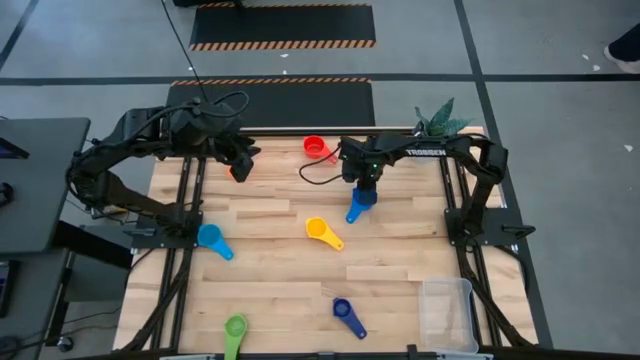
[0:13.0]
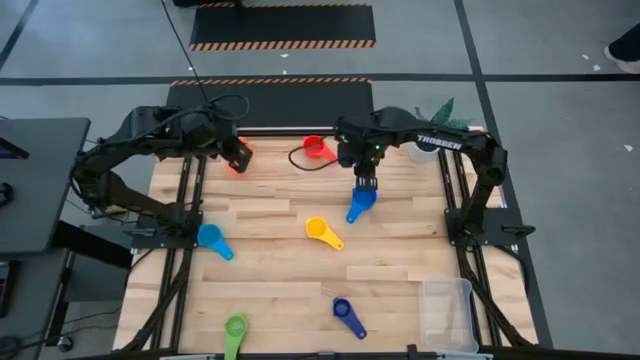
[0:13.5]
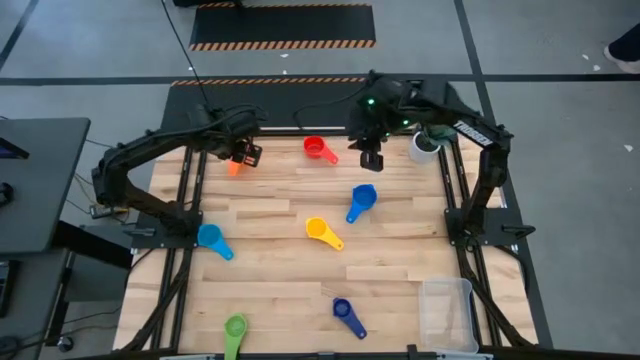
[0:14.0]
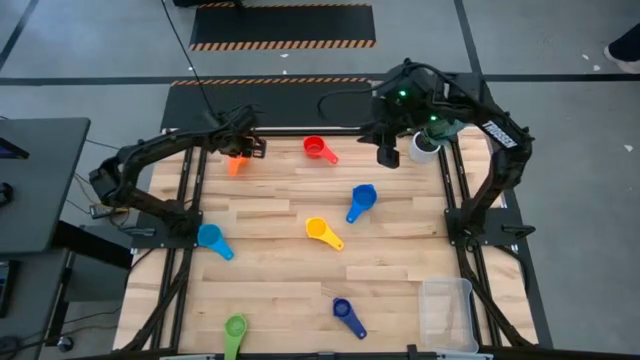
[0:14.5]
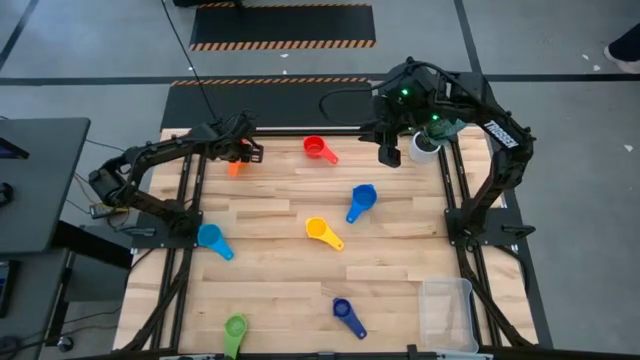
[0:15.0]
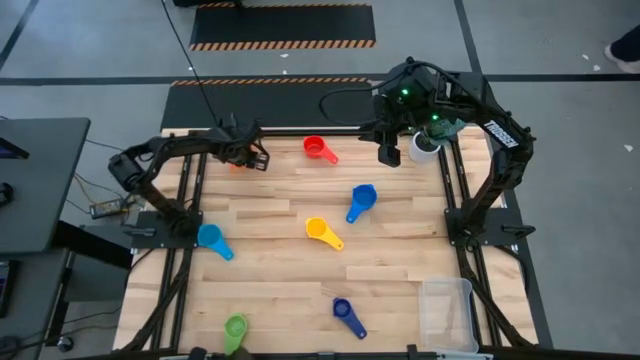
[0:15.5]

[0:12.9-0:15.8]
Task: Nest measuring cups in basket
Move the orange measuring cup to the center of the table

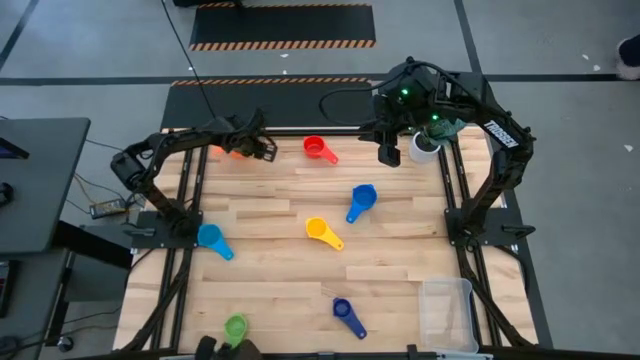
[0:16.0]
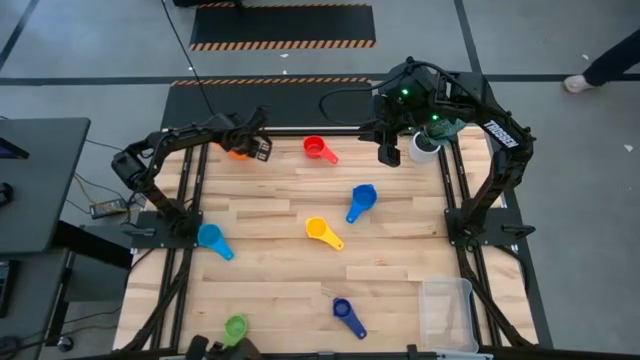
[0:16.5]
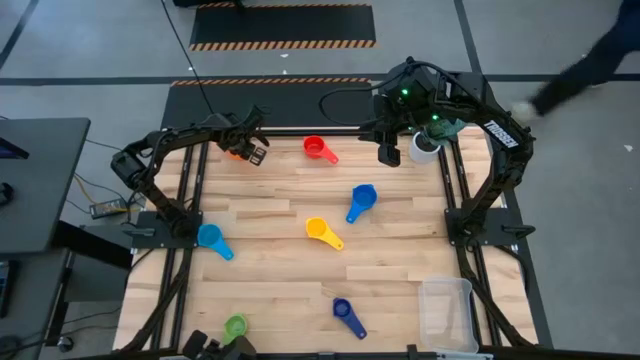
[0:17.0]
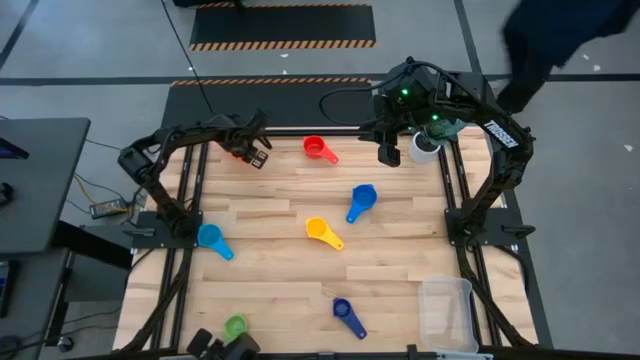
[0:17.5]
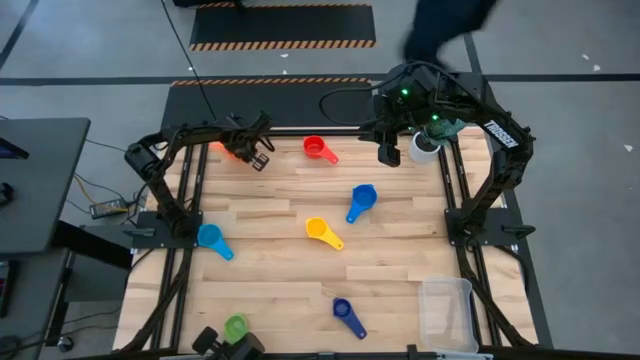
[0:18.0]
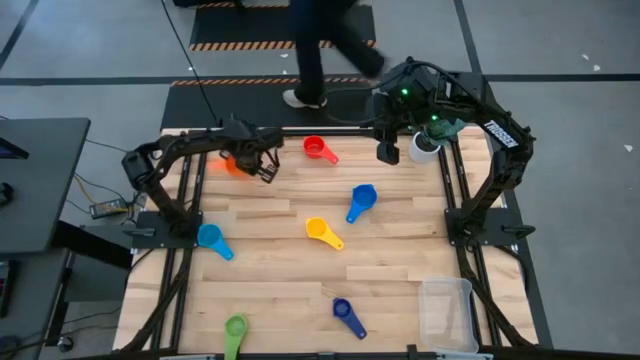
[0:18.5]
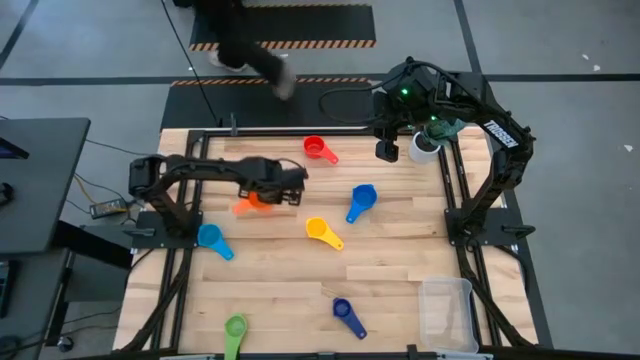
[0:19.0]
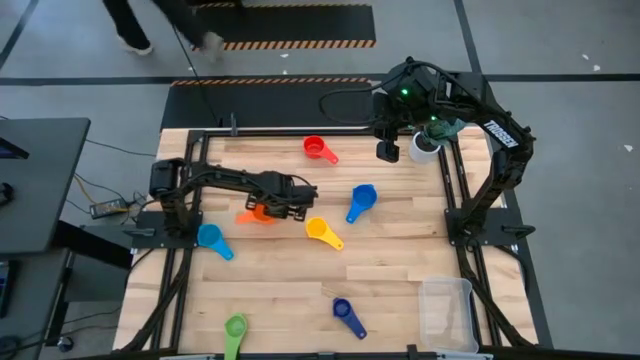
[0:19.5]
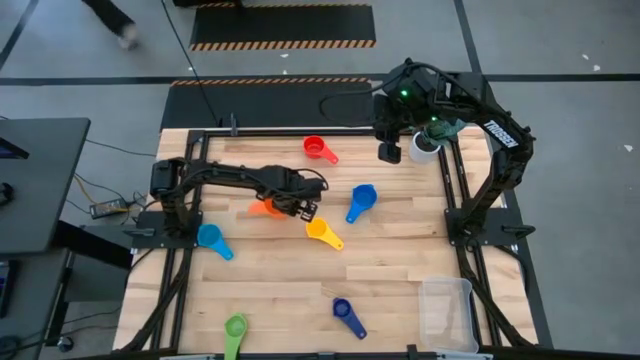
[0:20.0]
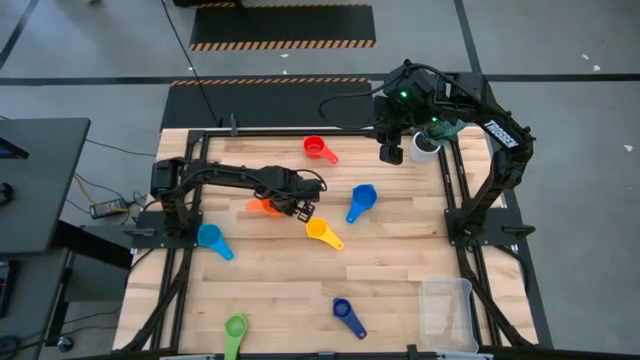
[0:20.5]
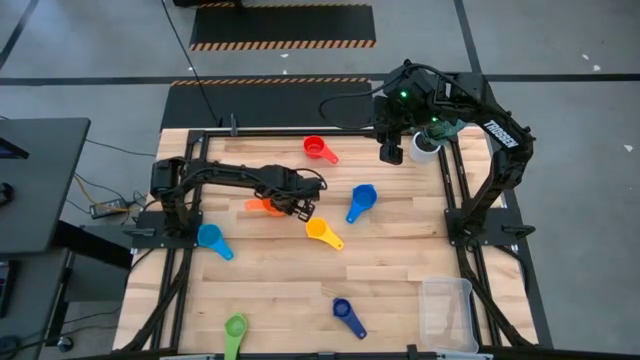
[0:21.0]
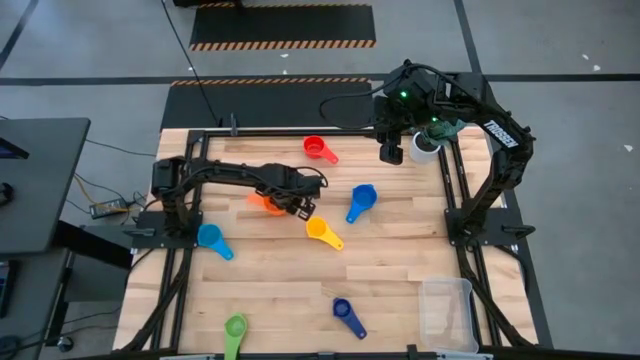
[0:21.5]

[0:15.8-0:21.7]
Move the orange measuring cup to the center of the table

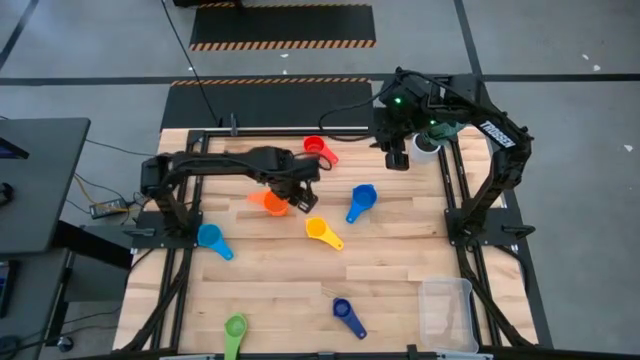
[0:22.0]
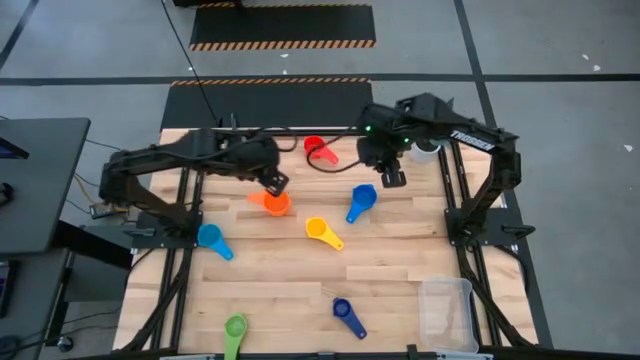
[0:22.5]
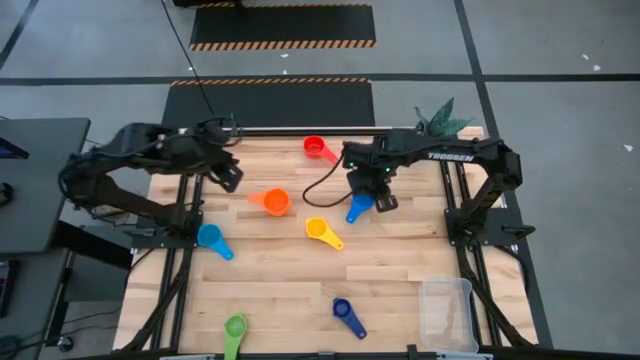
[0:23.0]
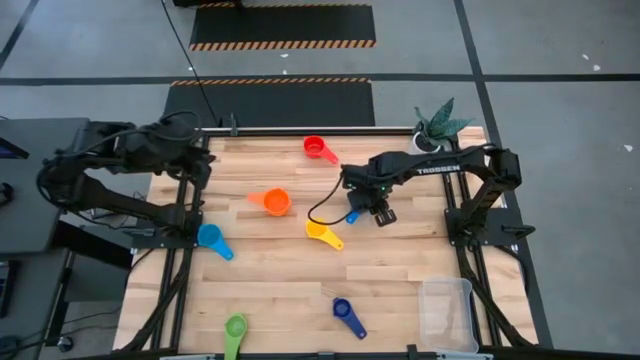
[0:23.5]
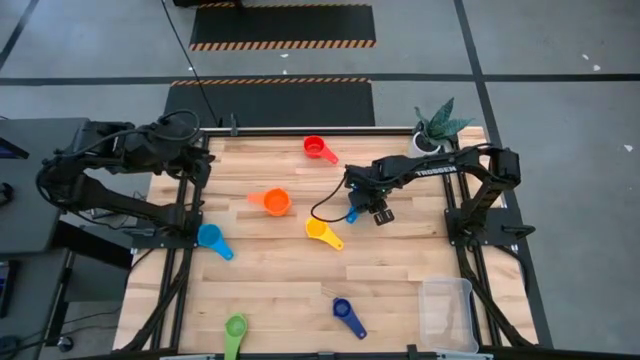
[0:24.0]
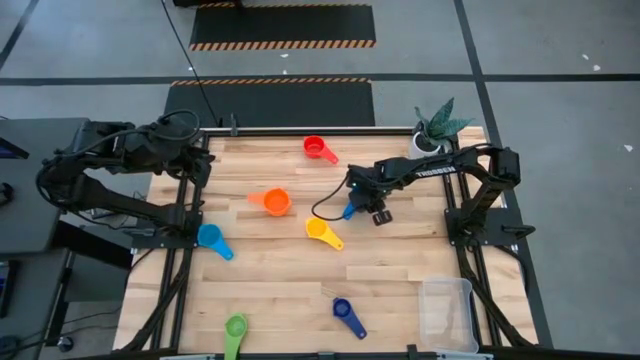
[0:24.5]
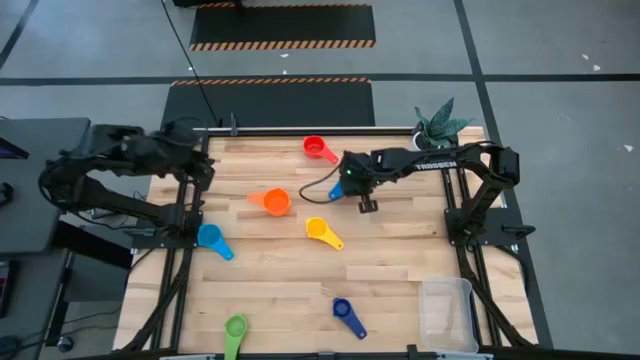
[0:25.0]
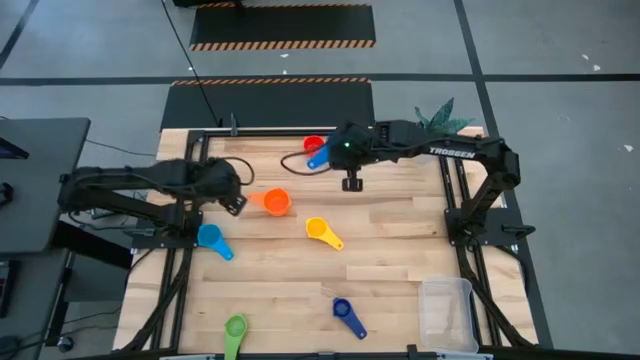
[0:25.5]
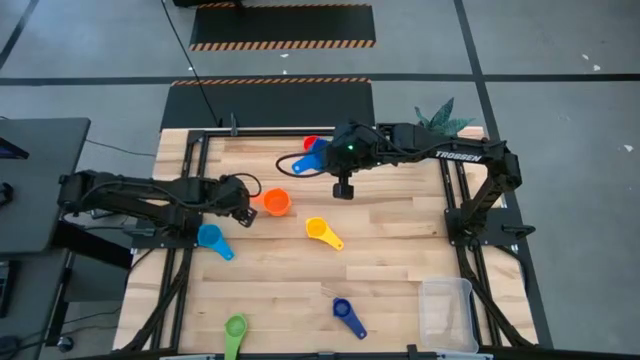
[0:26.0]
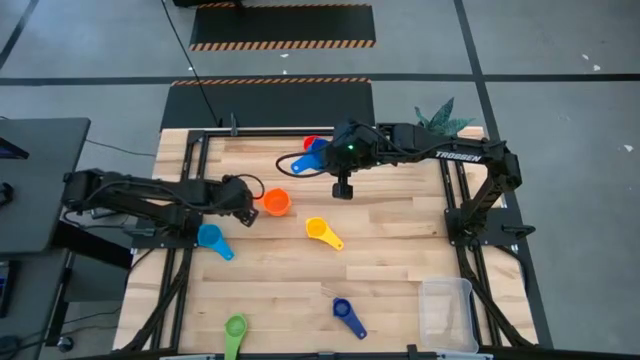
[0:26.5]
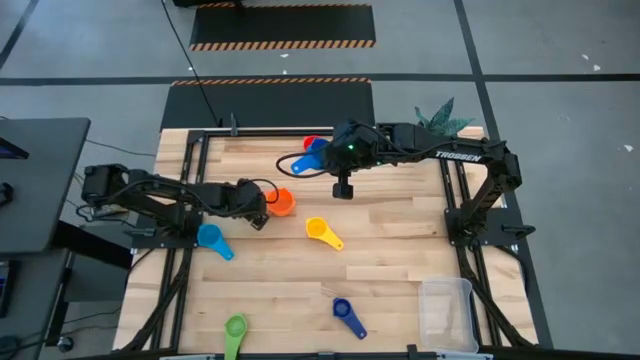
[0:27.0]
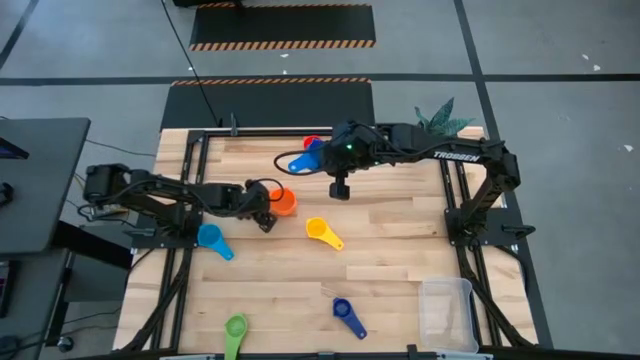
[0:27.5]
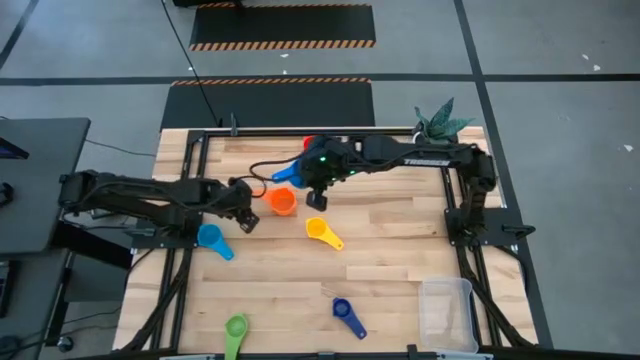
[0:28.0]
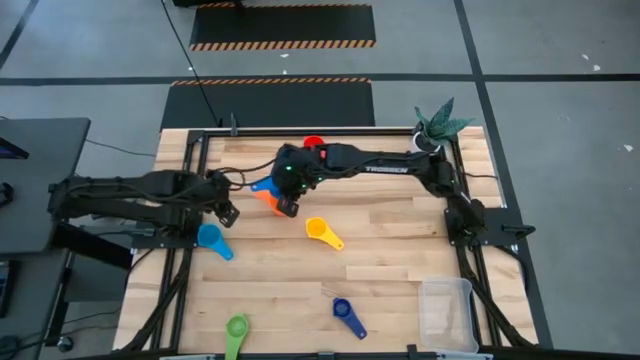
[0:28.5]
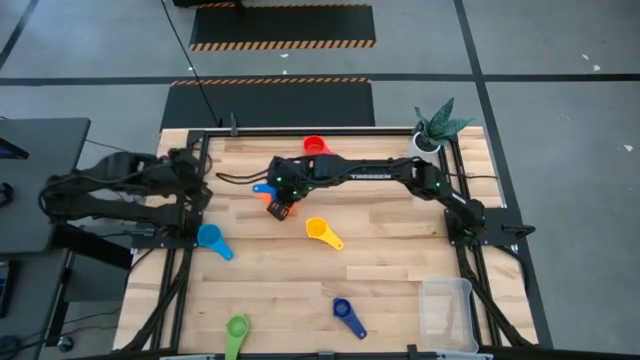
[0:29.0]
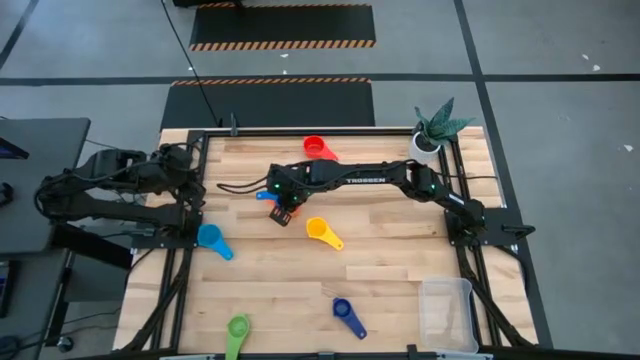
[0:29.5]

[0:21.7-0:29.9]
Stack the blue measuring cup on top of the orange measuring cup

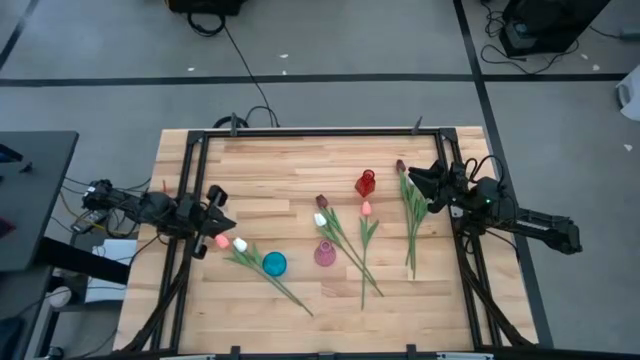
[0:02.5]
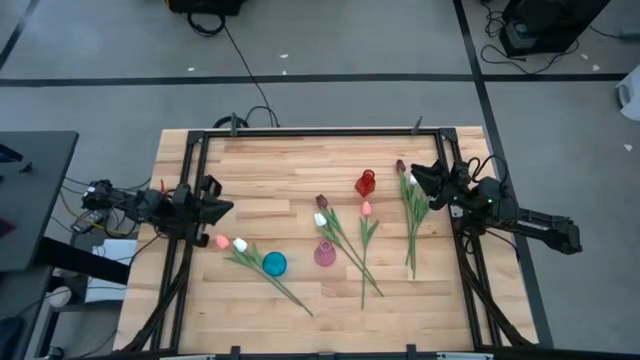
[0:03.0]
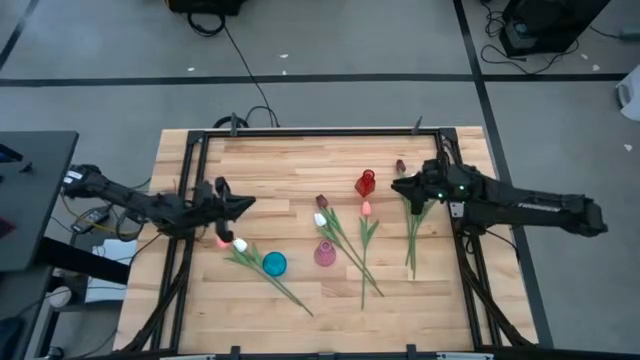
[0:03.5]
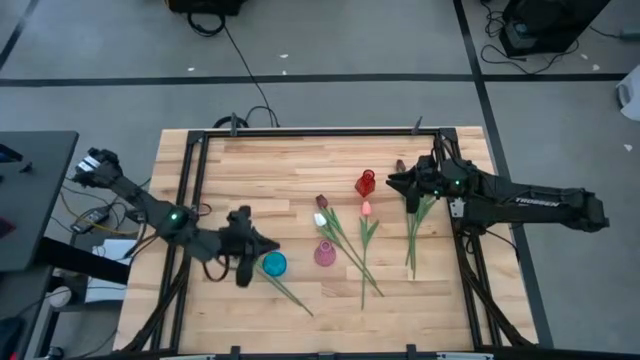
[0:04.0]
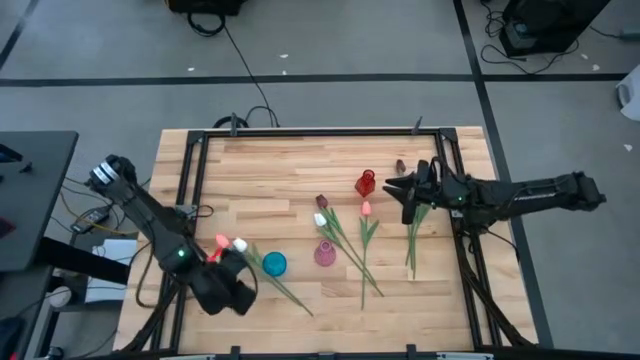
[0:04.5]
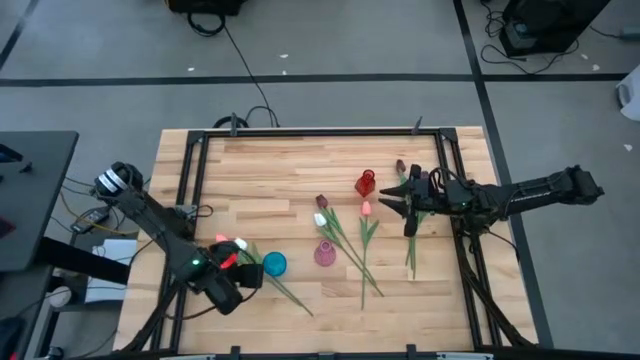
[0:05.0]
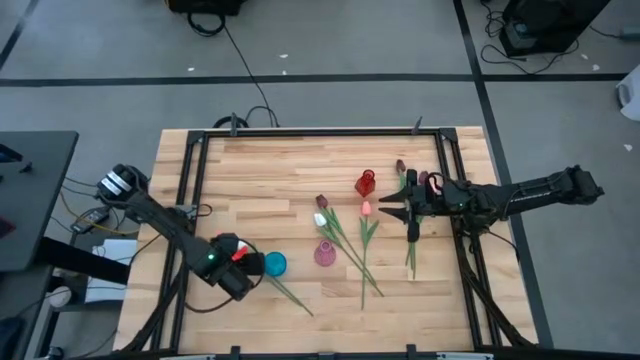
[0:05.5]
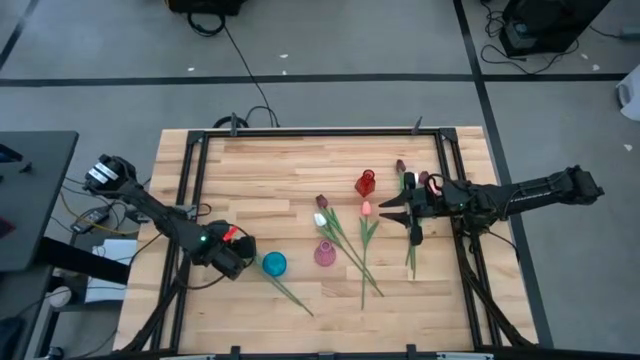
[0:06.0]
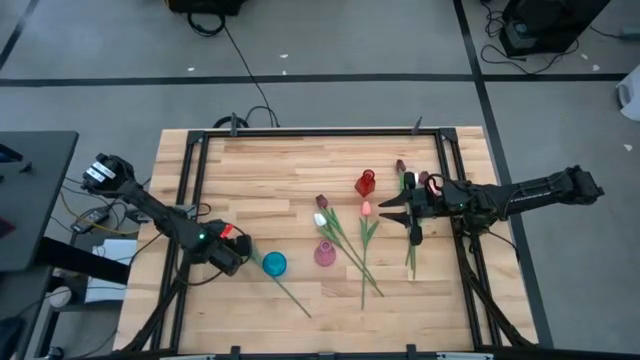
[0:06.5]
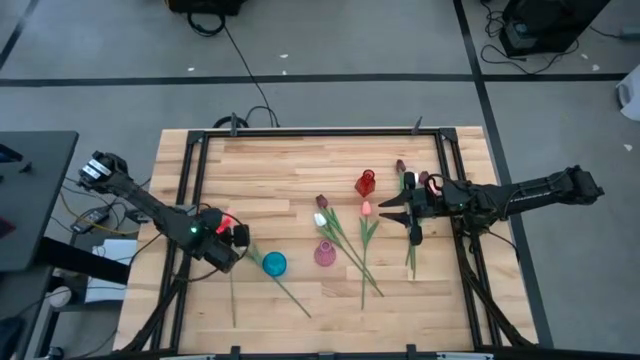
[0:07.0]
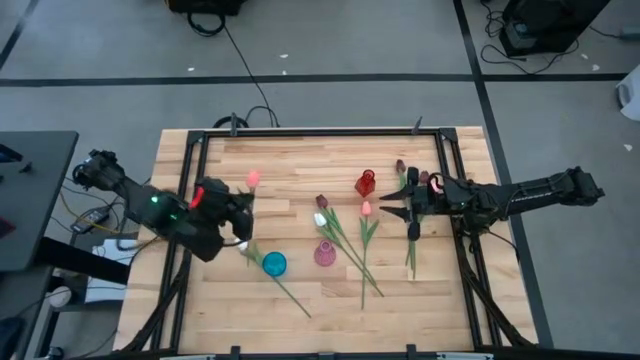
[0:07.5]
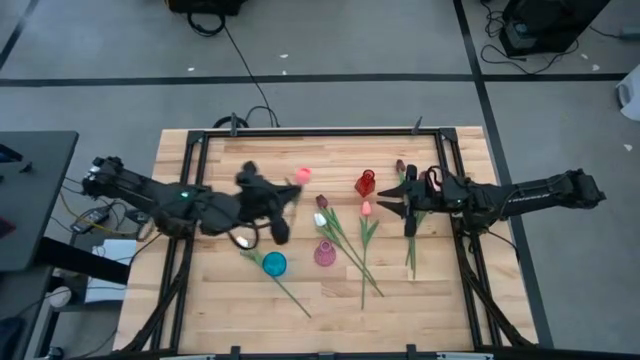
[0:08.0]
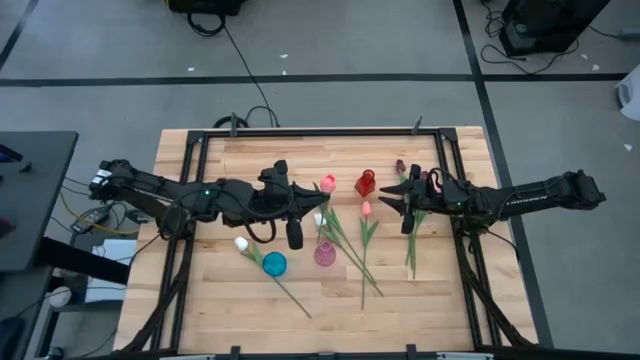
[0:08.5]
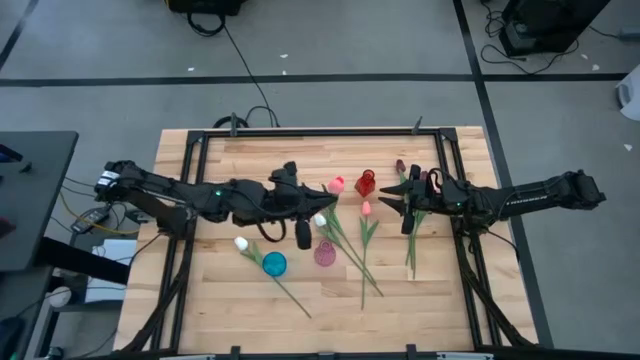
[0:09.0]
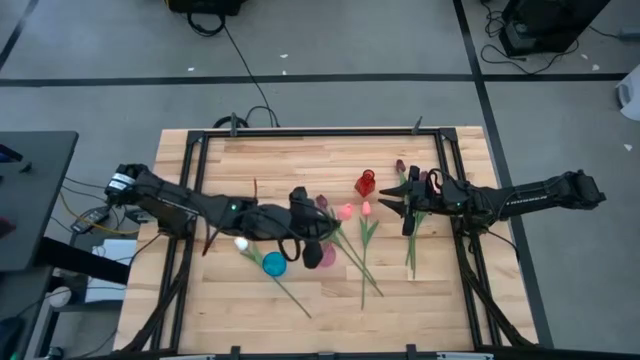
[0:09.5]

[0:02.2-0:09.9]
Task: Sort flowers into vase by color
Put the bottom left pink tulip into the pink vase
